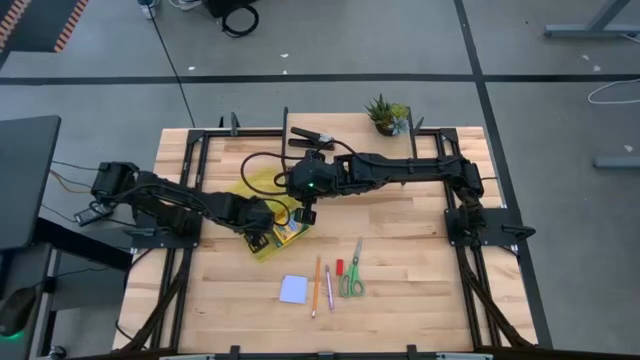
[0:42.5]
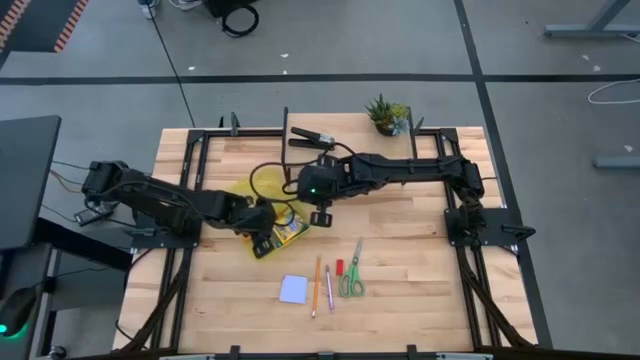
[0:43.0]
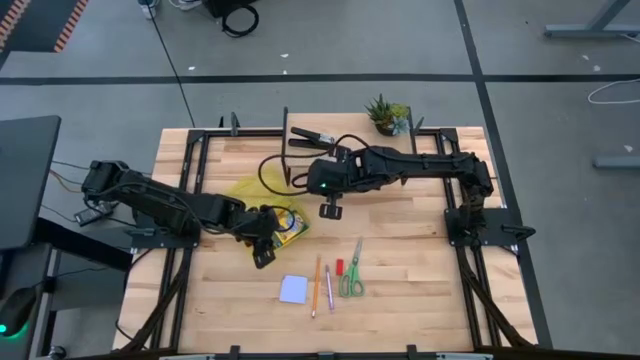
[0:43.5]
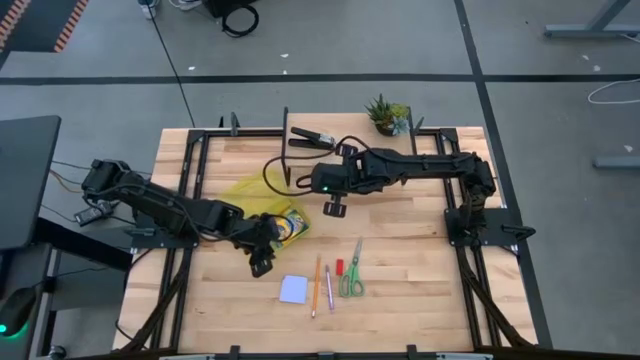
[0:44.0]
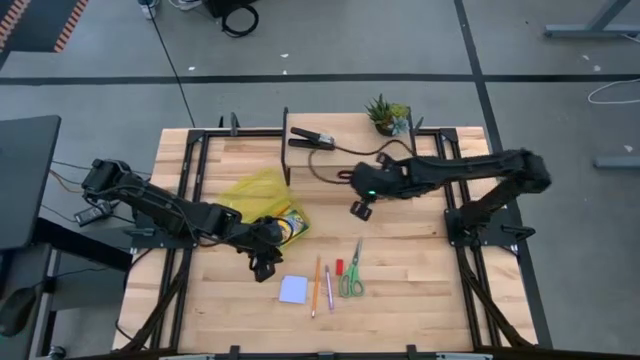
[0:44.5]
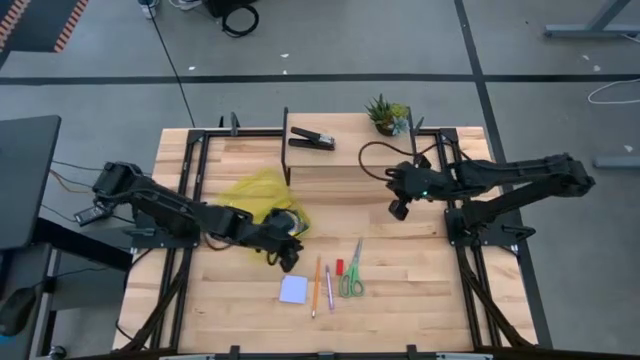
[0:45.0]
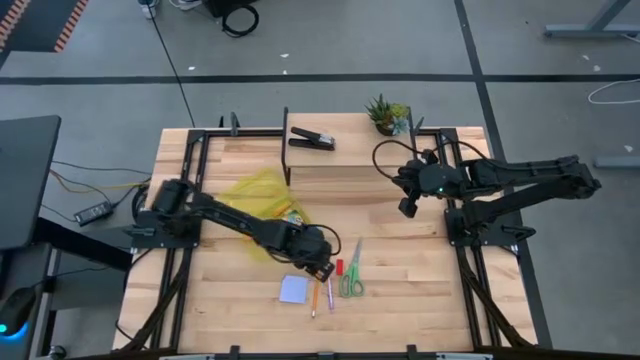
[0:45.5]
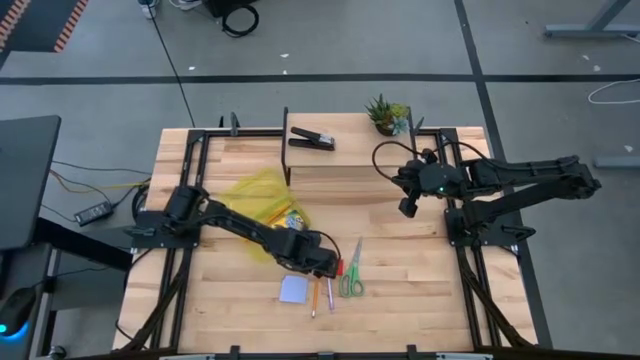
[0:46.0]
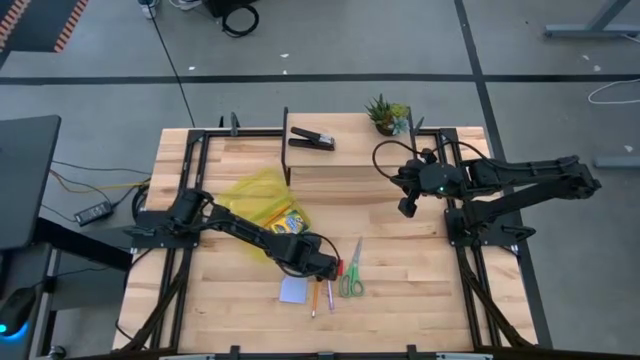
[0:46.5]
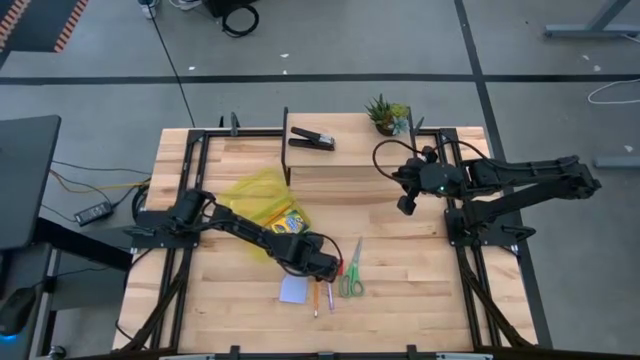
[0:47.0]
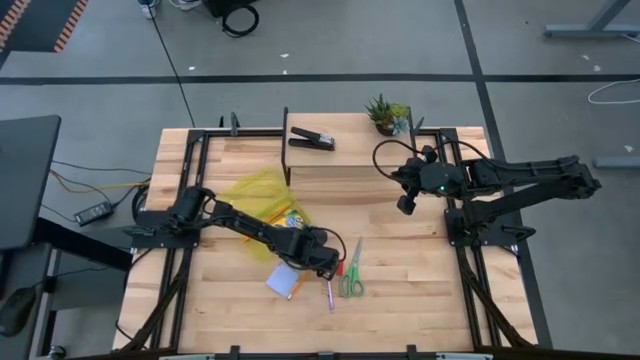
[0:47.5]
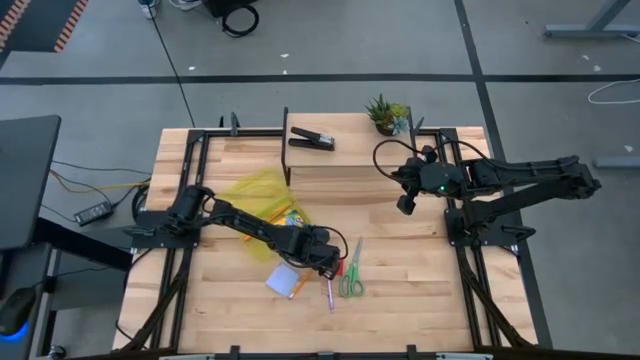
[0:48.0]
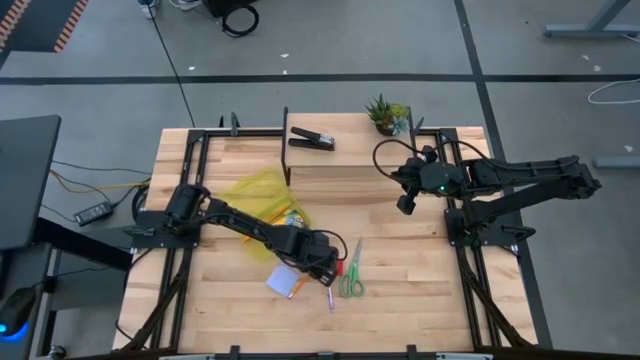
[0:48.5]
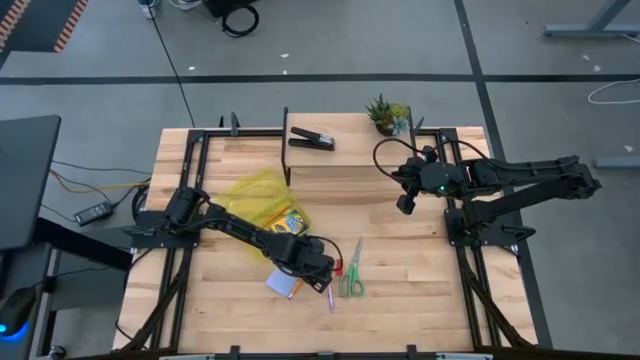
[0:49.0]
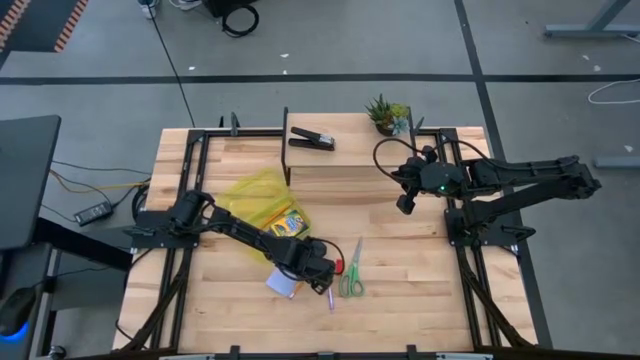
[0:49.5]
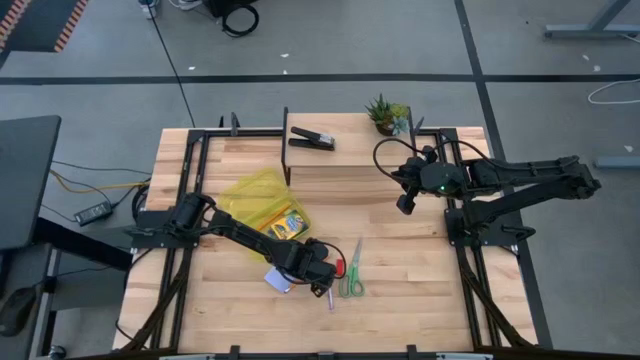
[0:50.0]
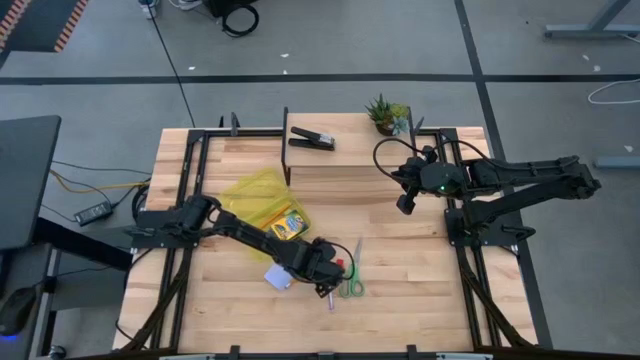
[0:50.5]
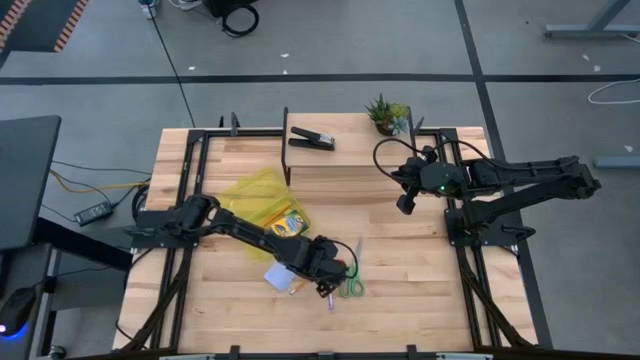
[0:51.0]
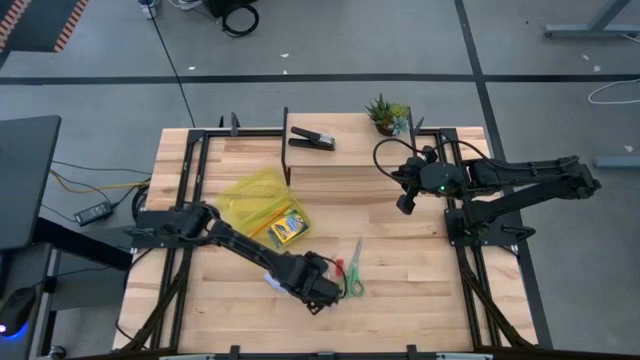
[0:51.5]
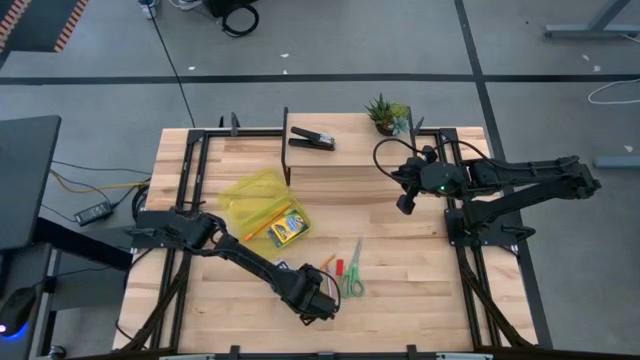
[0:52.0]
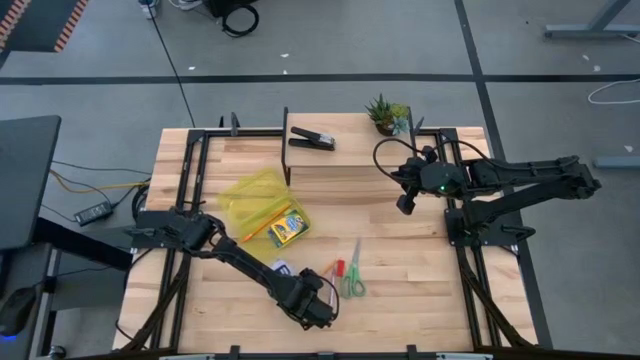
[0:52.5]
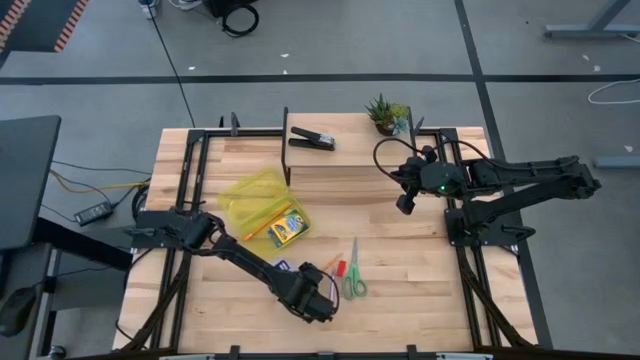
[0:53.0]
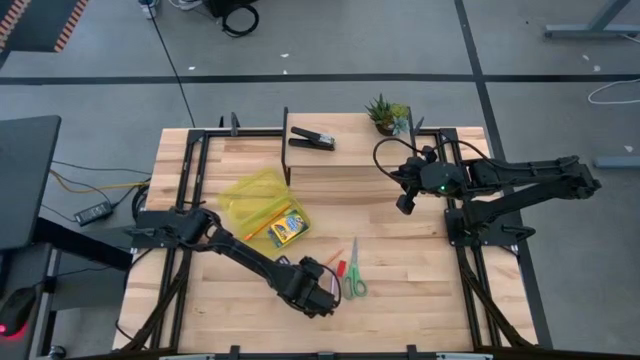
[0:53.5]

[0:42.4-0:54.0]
Task: Pack school essentials
Put the orange pencil into the yellow supply box

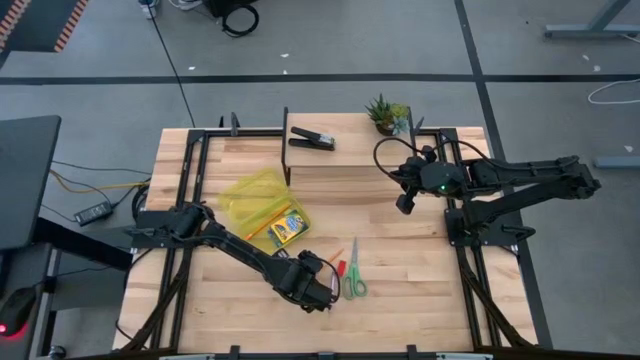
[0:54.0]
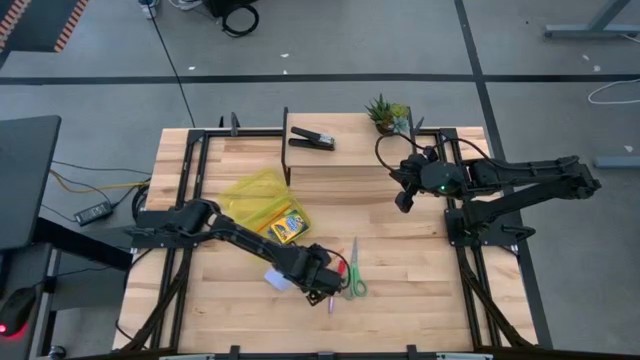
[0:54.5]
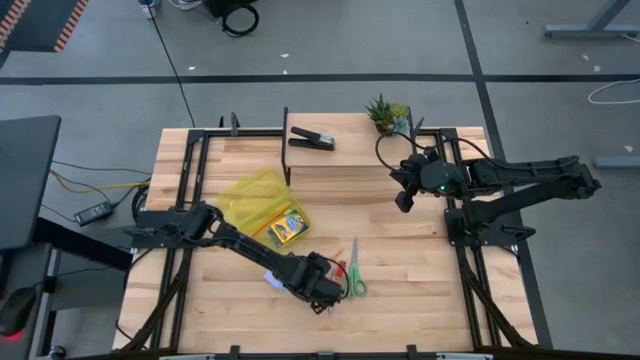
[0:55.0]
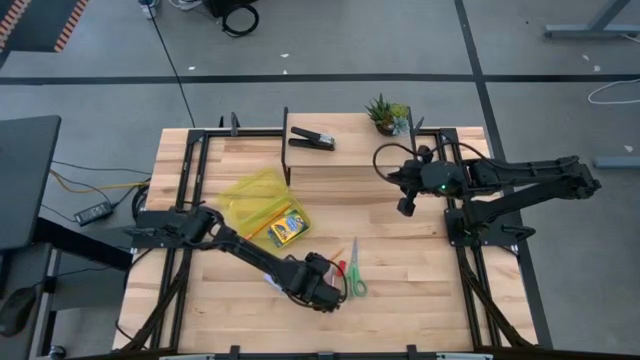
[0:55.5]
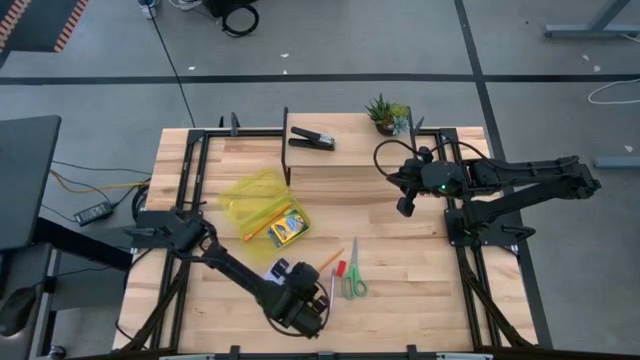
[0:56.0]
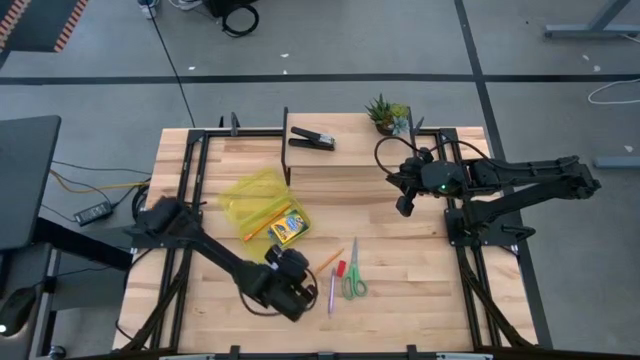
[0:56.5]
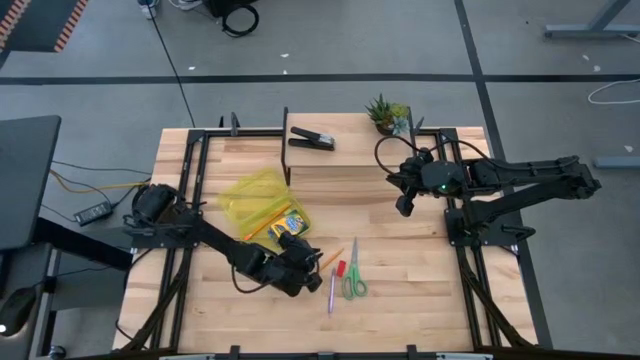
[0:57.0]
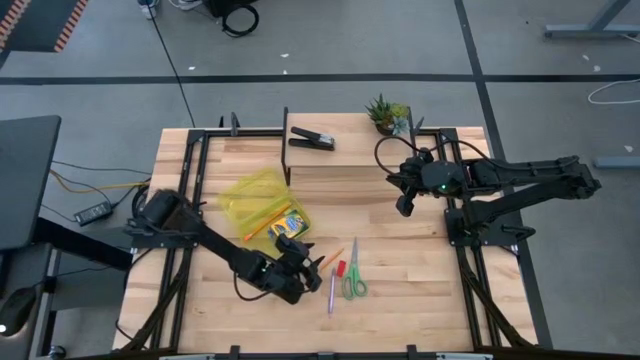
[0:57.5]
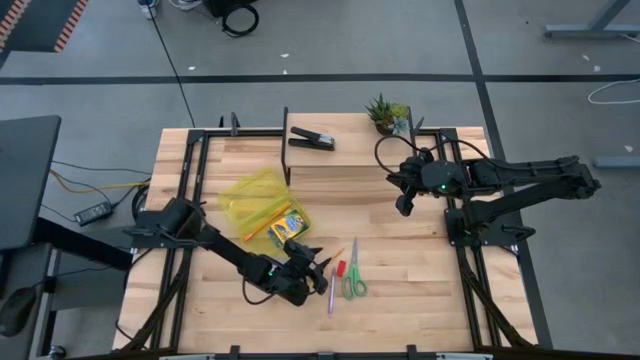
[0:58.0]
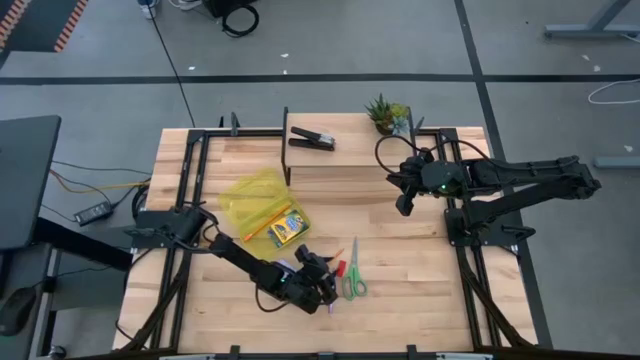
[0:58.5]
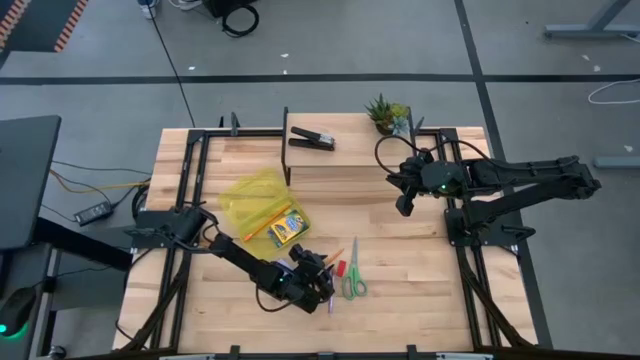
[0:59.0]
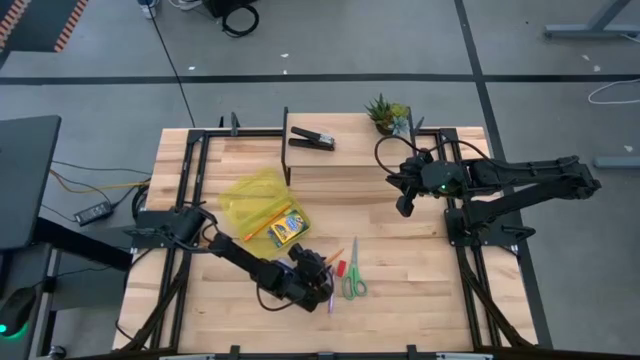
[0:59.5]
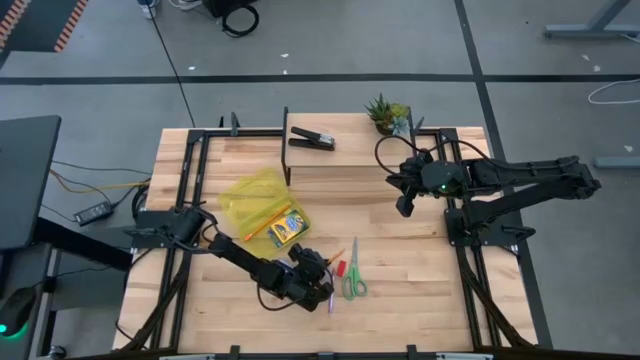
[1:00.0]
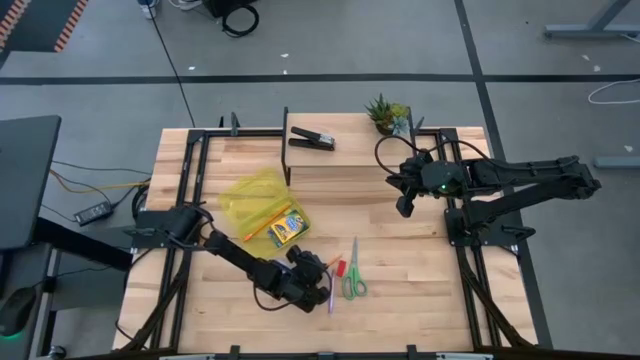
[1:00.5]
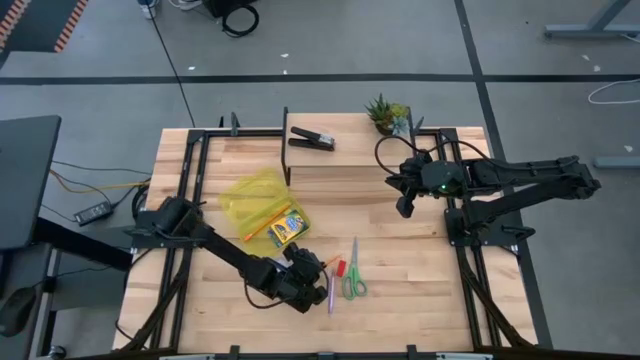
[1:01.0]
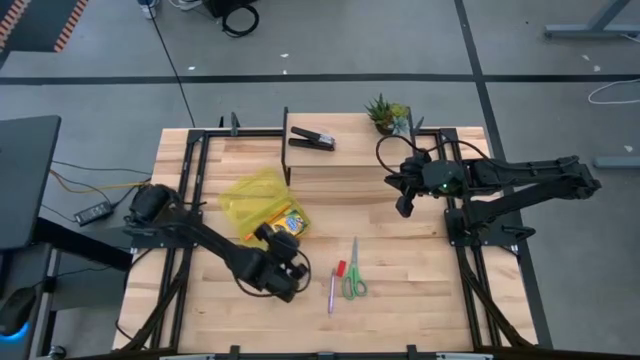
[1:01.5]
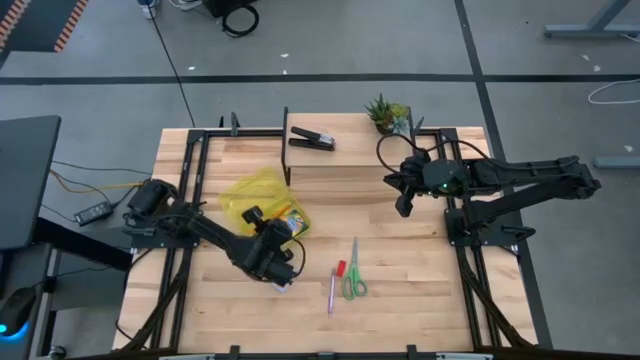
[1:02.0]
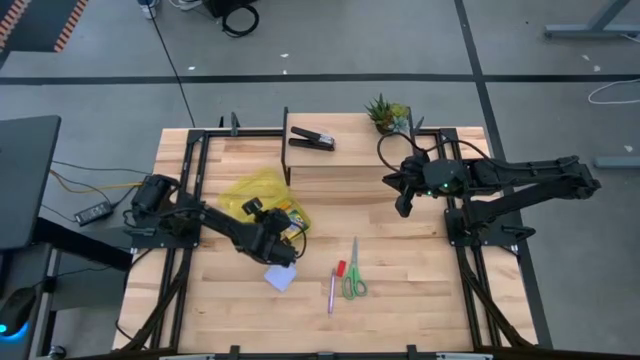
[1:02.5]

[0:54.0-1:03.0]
Put the orange pencil into the yellow supply box

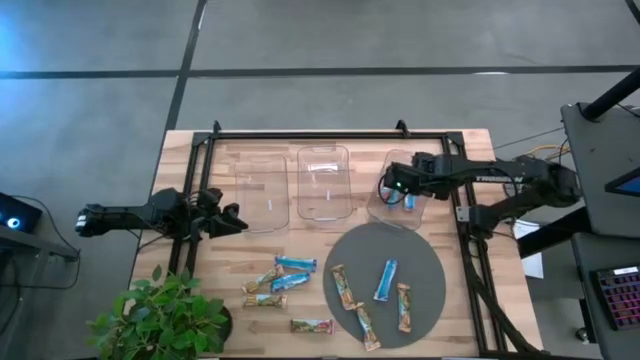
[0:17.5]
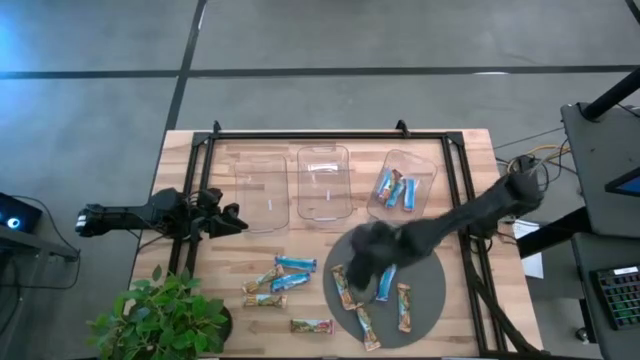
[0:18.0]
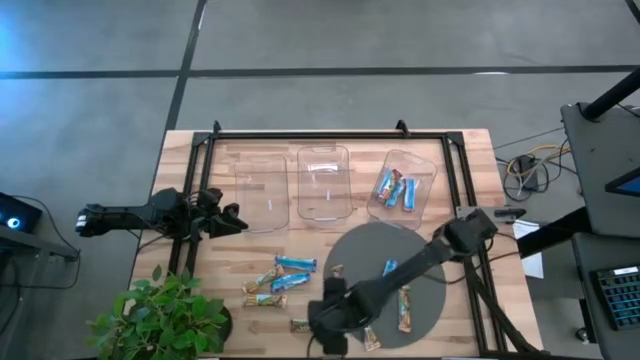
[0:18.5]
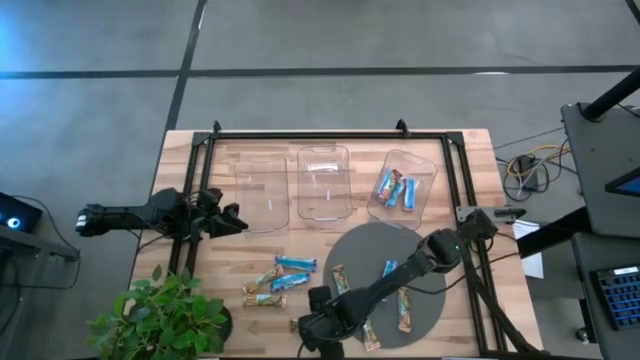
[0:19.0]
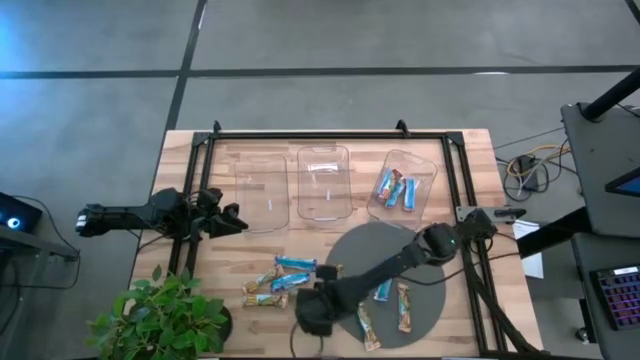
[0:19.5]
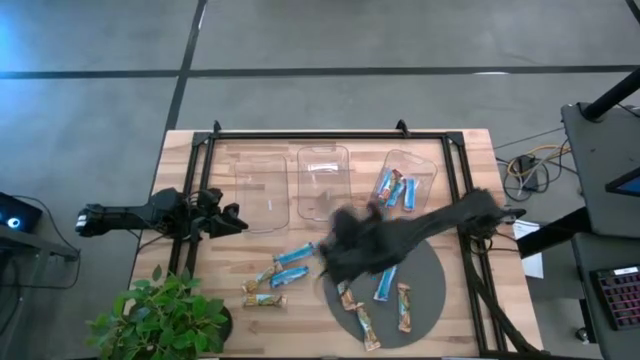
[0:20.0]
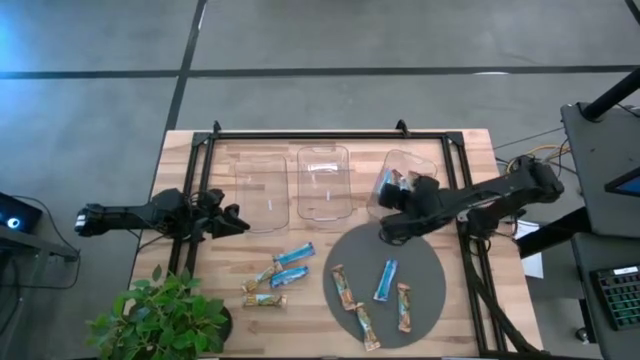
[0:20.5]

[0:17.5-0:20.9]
Task: Pick and place Granola Bars by type
Put the red granola bar into the right transparent bin
